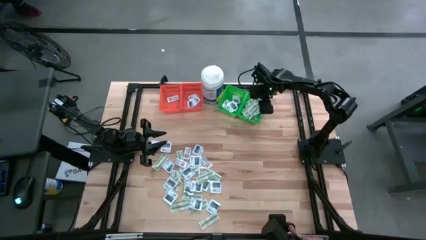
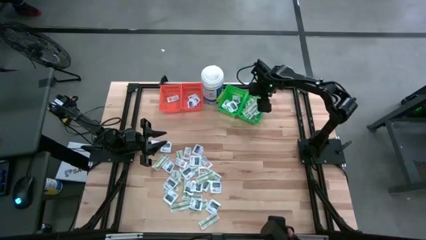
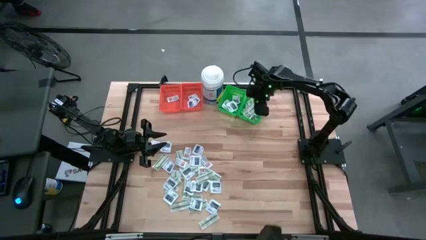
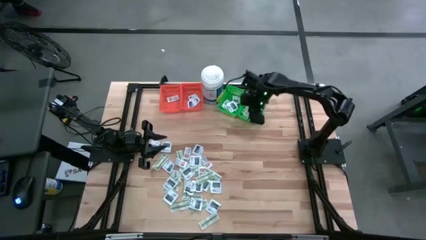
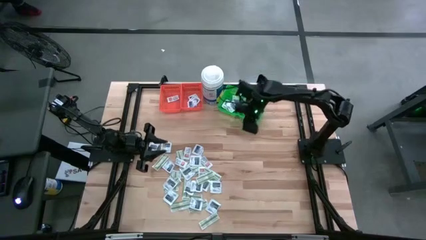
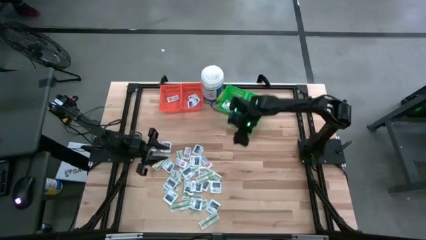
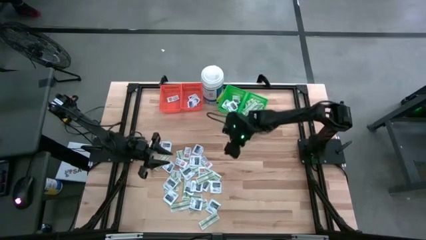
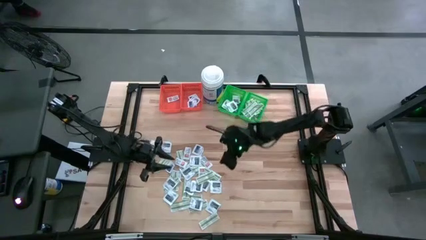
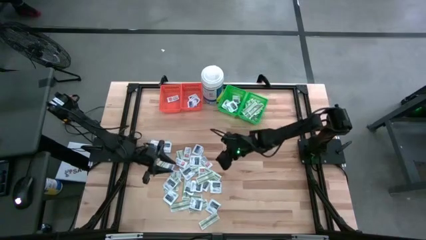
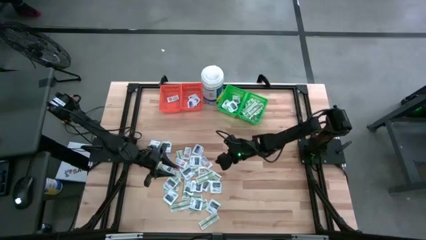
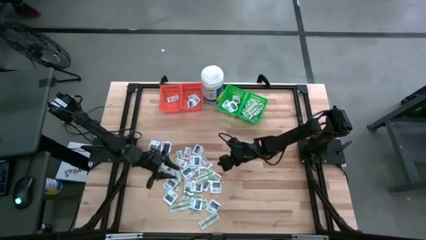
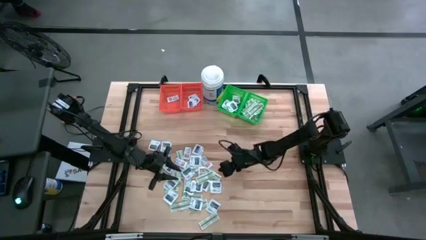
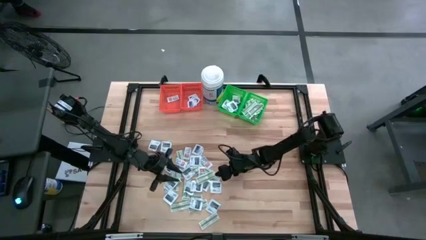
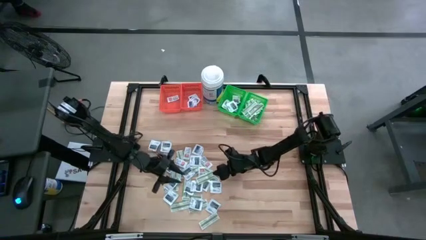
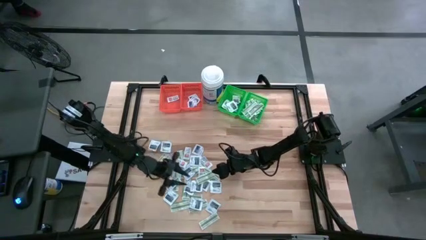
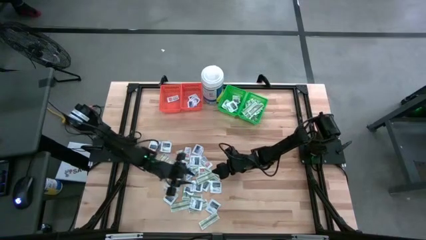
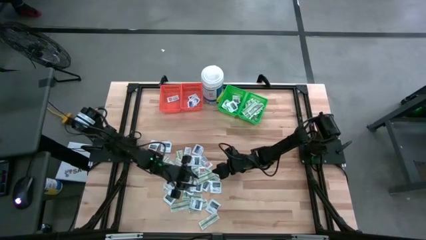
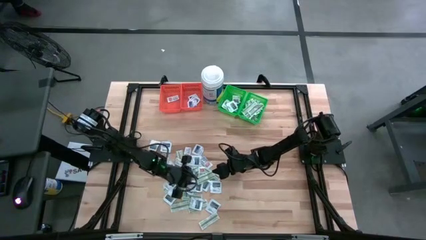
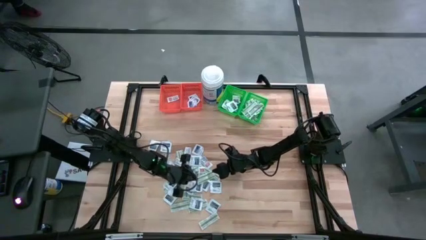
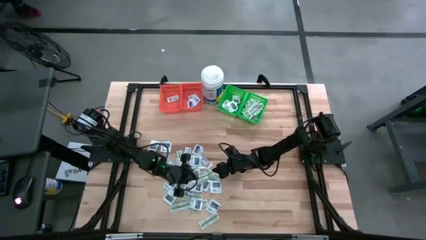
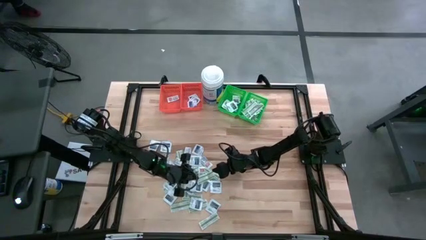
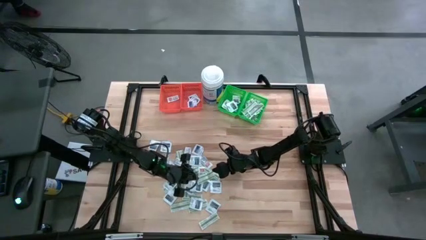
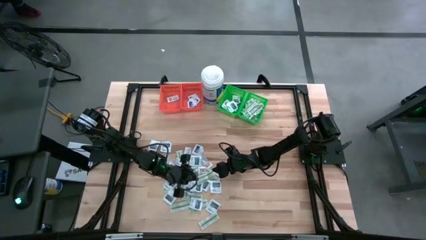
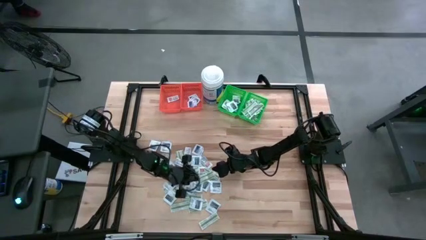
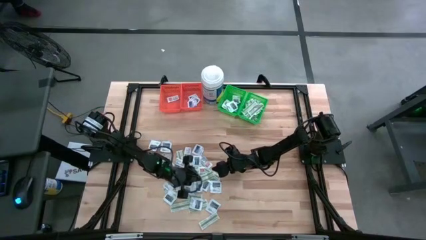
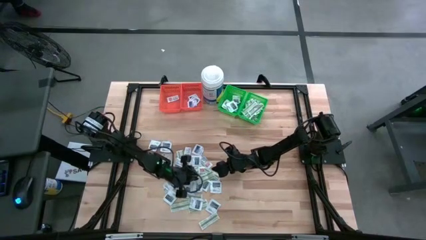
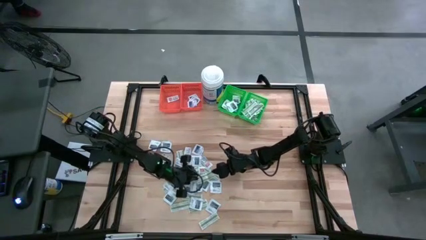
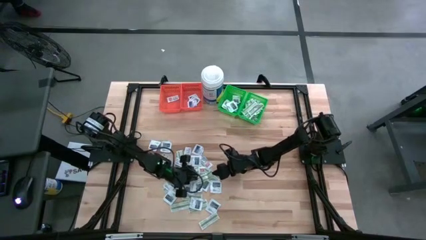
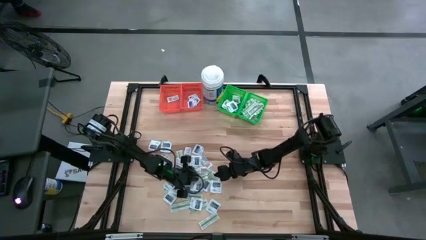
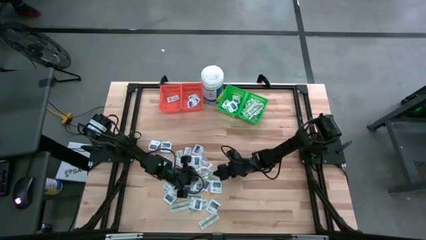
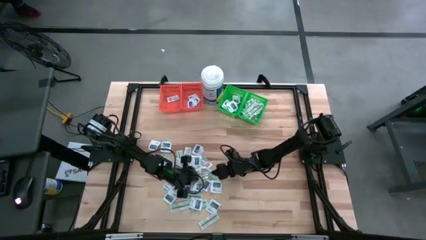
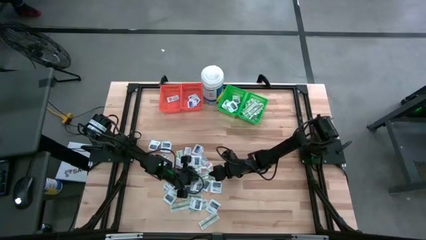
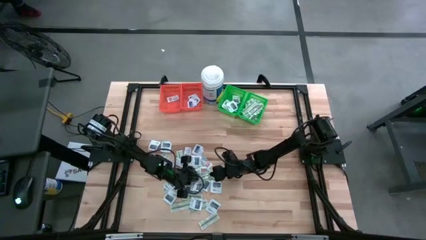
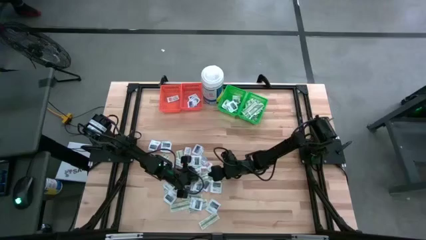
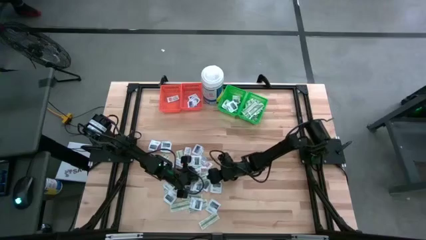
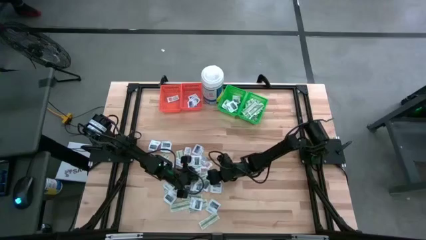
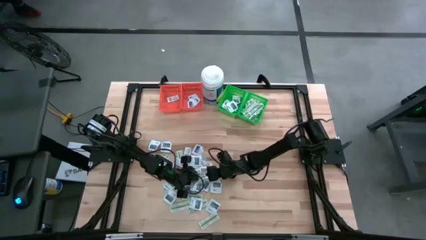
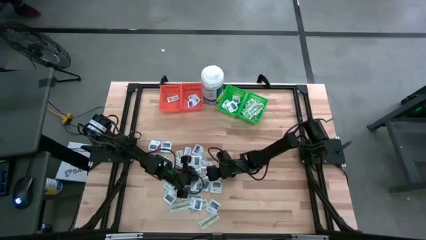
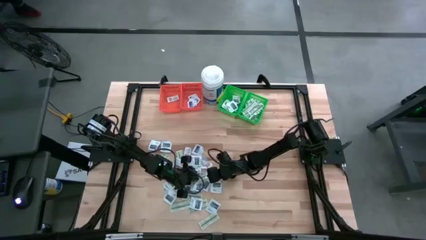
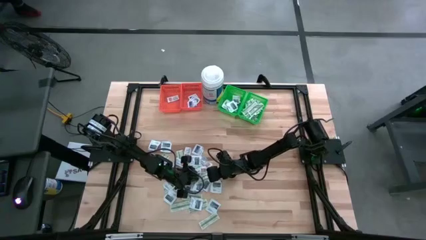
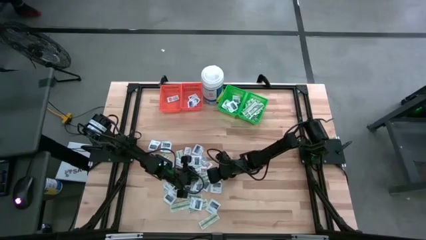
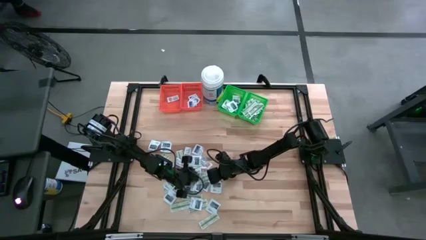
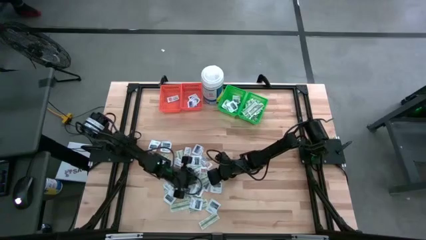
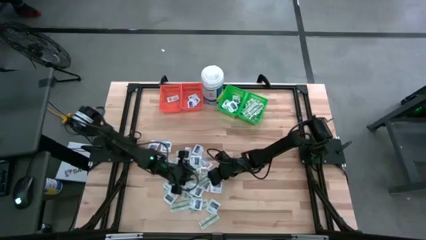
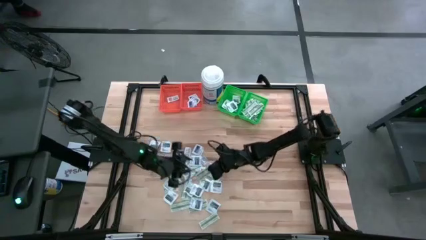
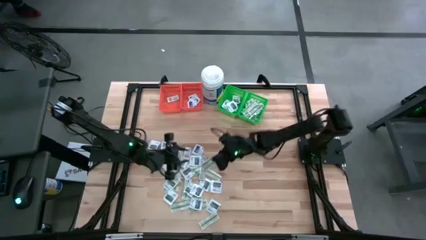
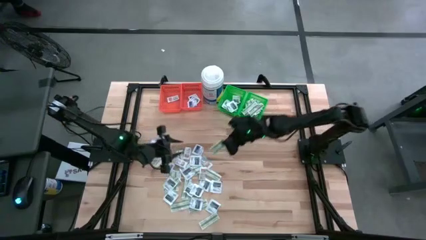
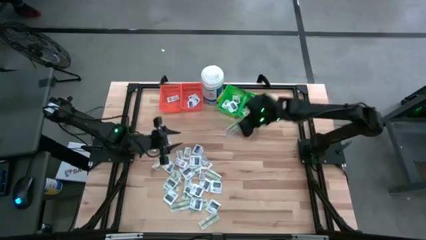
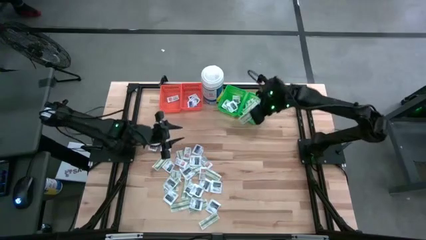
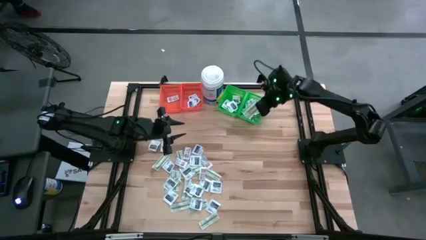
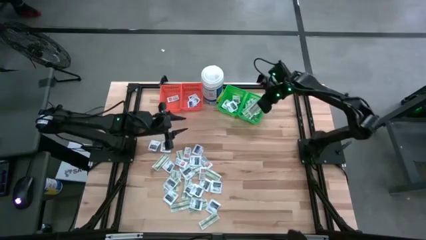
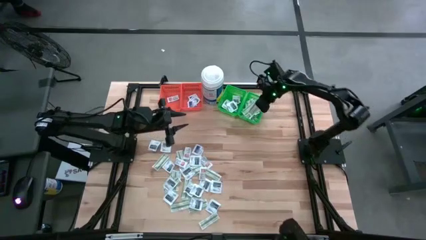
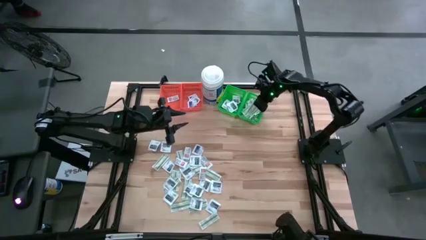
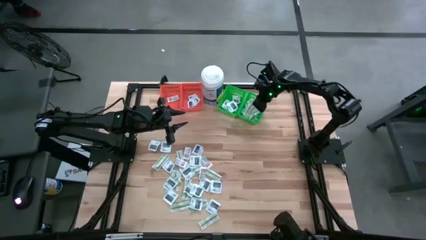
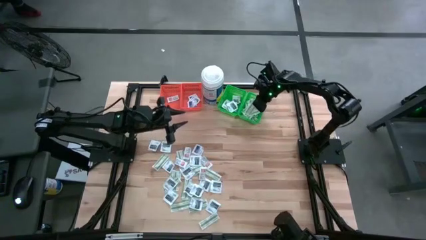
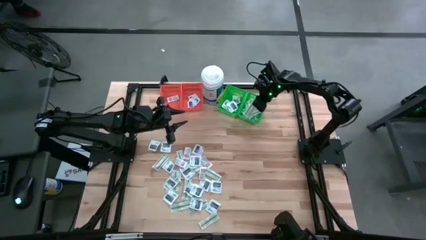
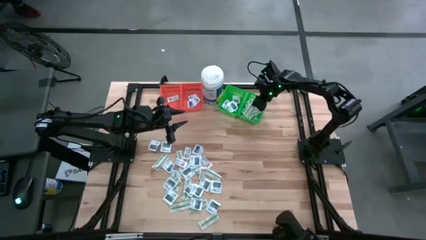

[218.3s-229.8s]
Task: Pick & Place First Aid Supplies
Put the green bandage pack into the right green bin

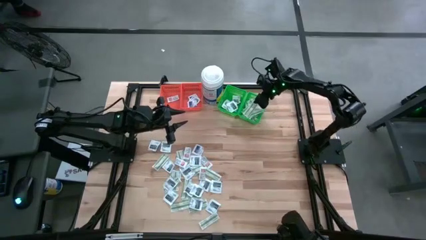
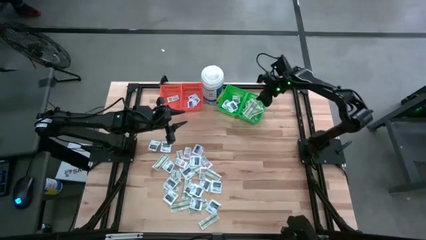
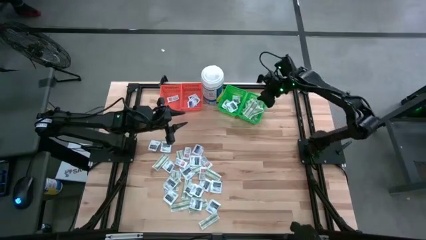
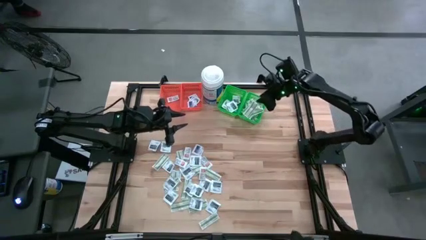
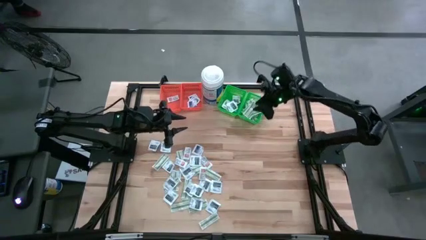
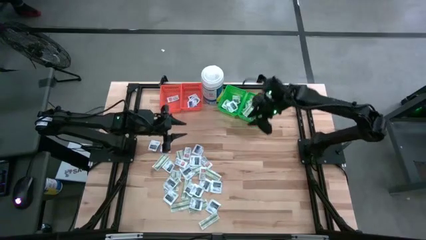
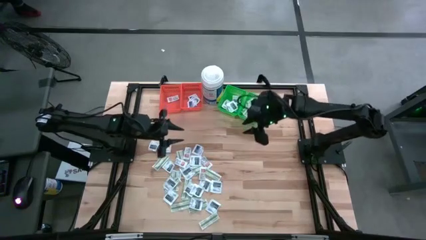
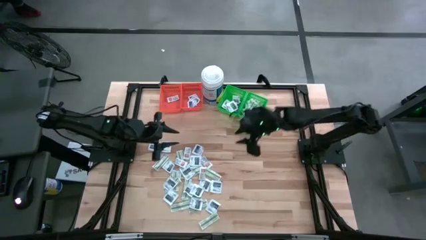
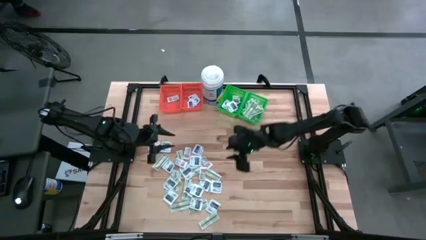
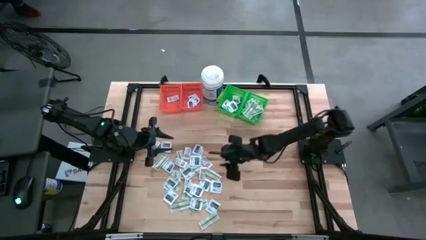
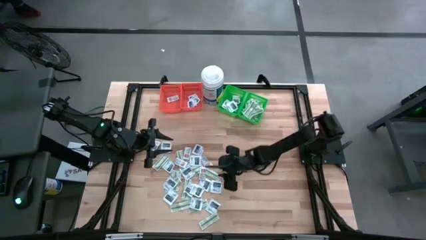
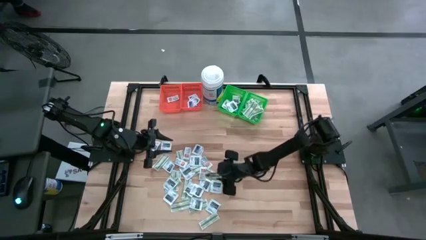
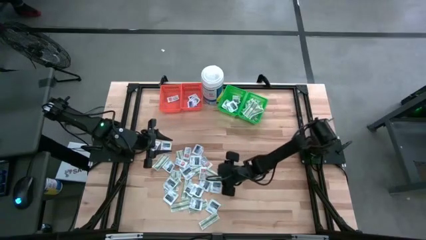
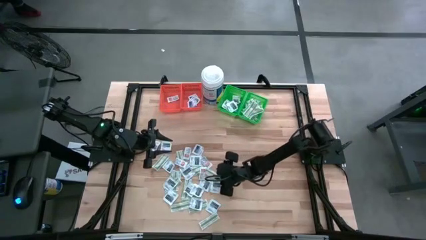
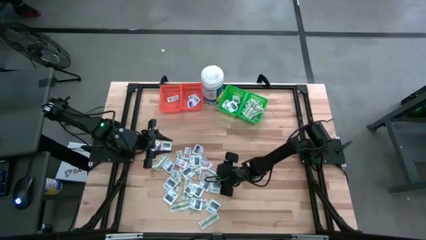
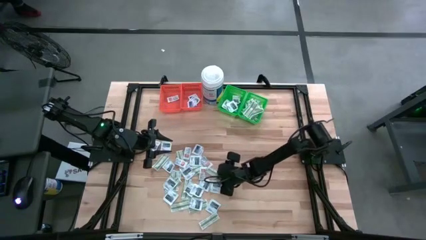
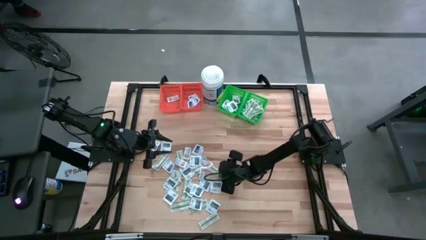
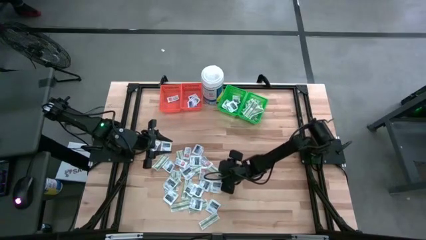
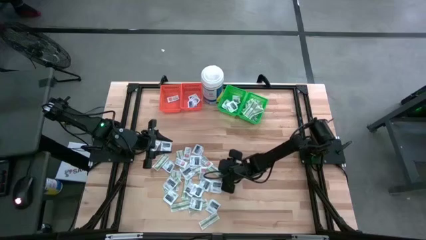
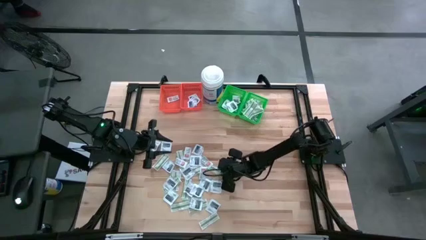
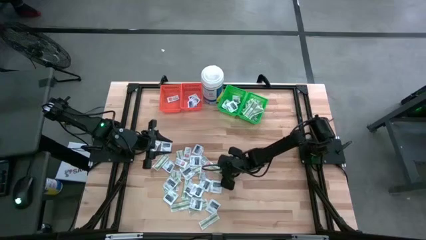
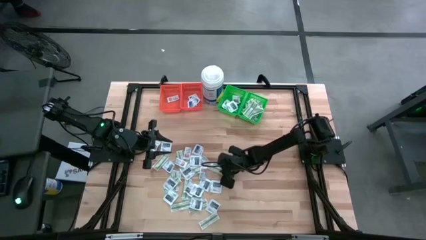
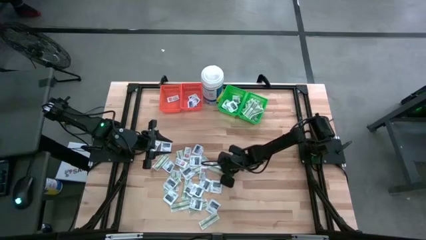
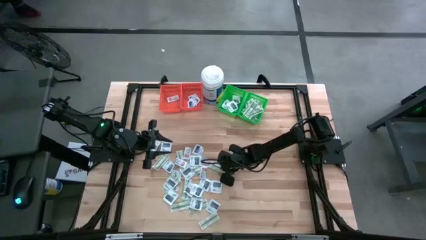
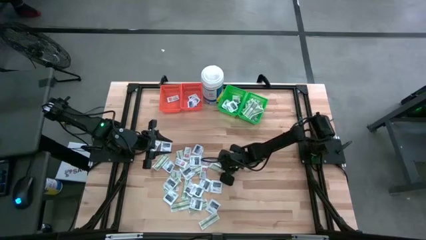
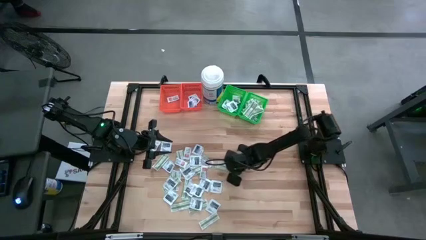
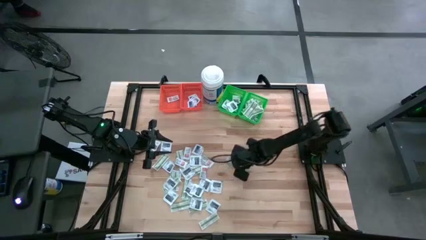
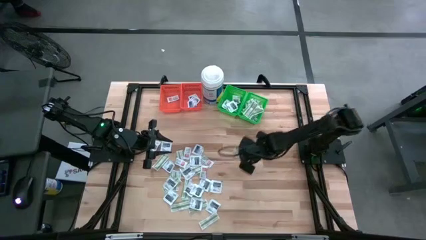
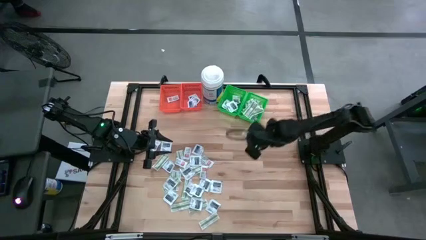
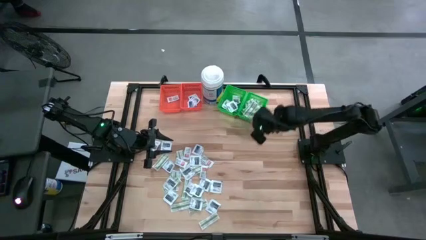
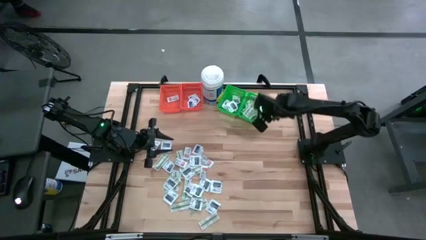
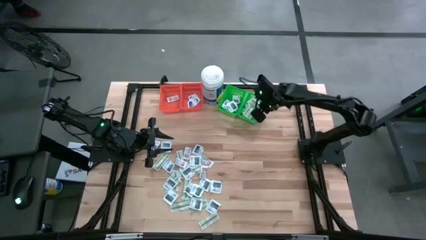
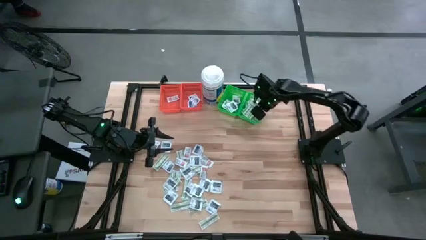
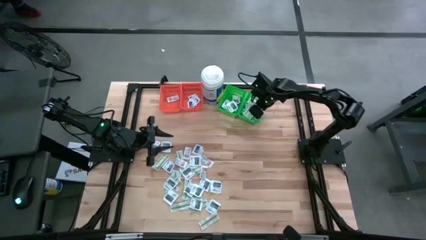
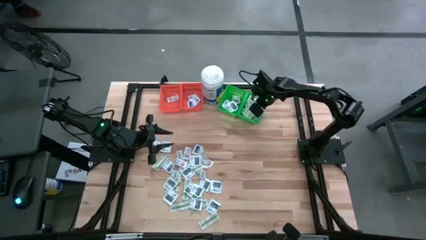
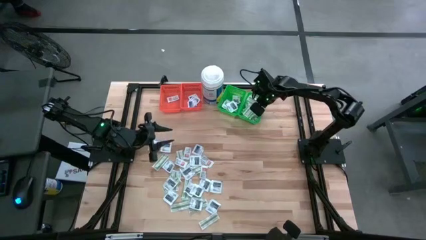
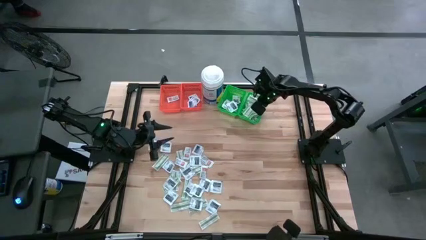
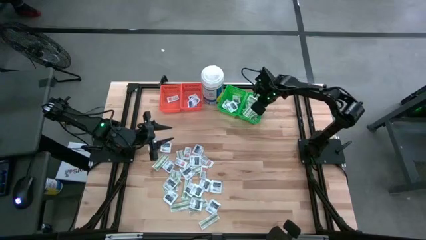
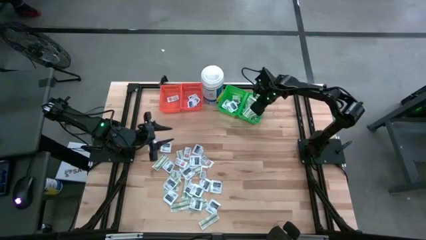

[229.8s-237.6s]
Put the green bandage pack into the right green bin
